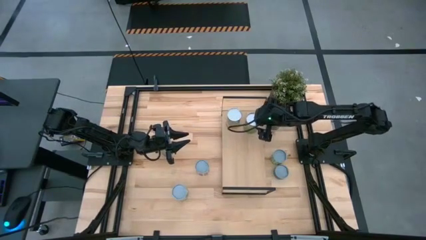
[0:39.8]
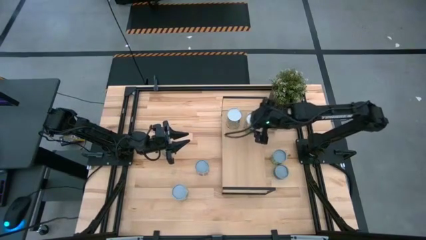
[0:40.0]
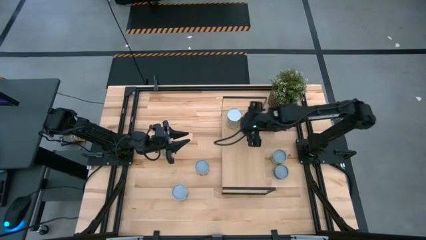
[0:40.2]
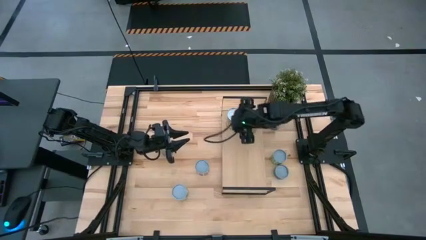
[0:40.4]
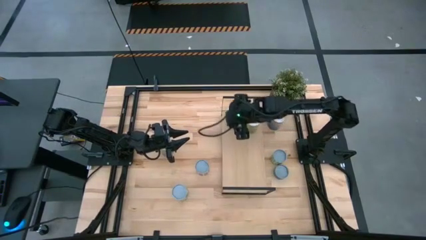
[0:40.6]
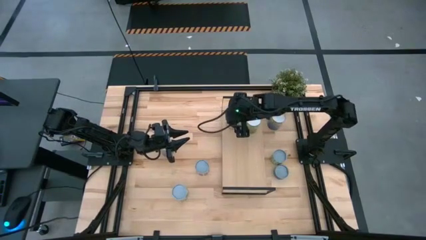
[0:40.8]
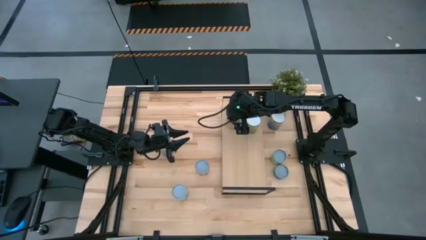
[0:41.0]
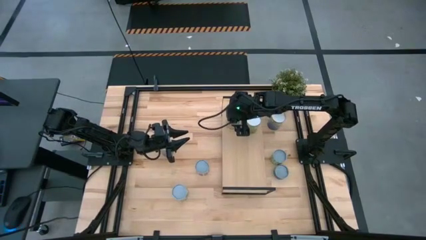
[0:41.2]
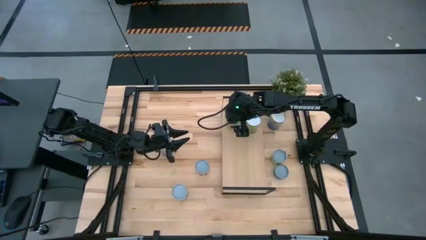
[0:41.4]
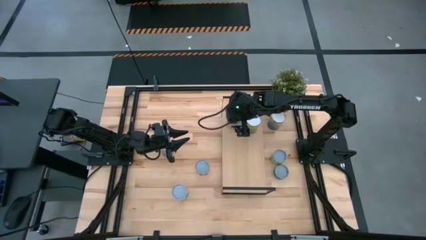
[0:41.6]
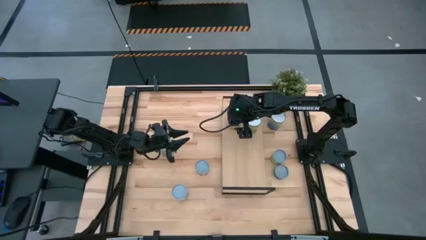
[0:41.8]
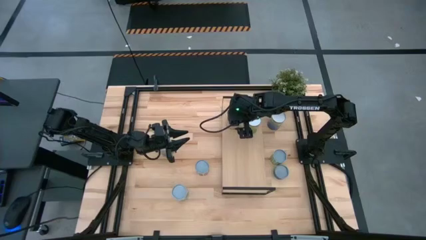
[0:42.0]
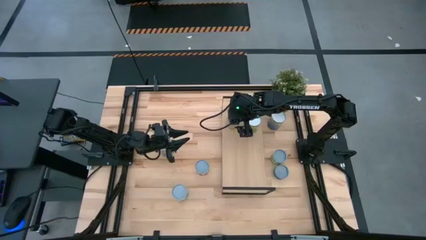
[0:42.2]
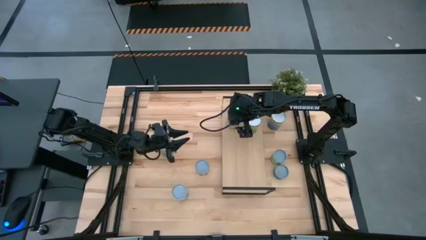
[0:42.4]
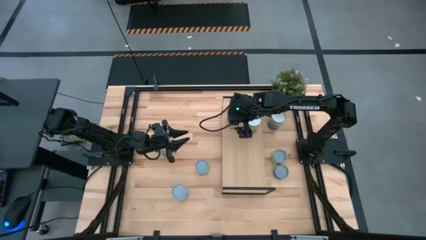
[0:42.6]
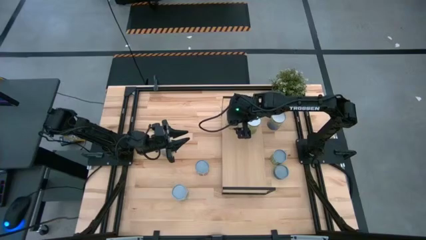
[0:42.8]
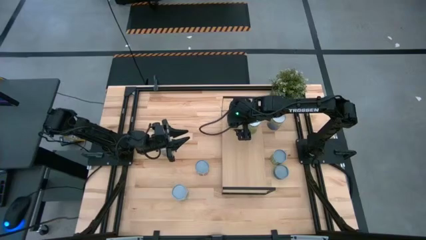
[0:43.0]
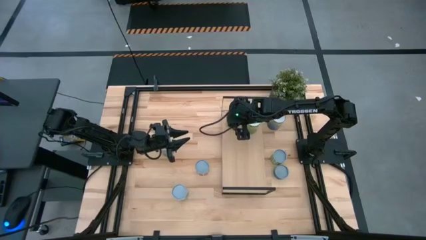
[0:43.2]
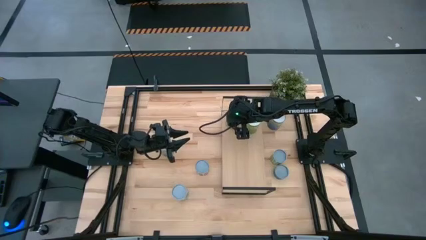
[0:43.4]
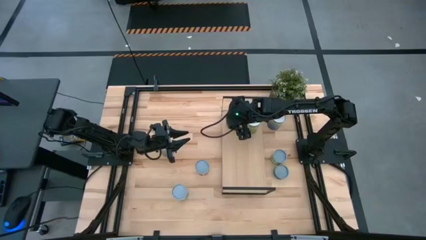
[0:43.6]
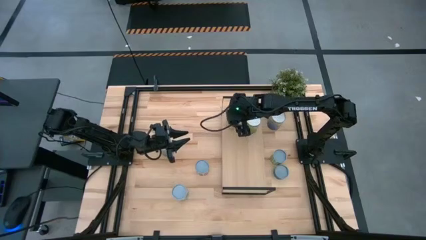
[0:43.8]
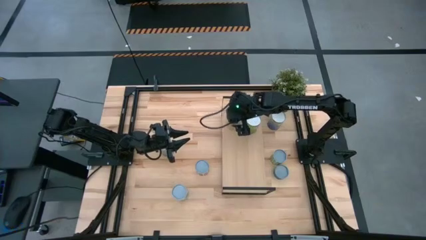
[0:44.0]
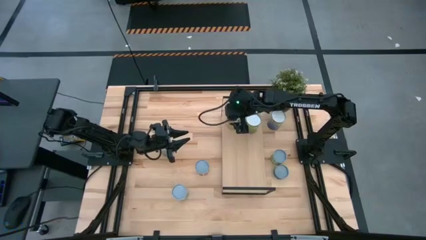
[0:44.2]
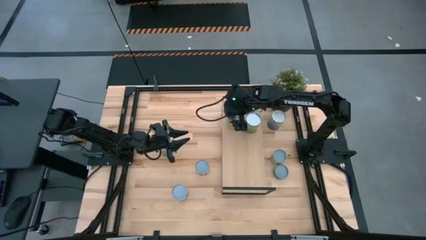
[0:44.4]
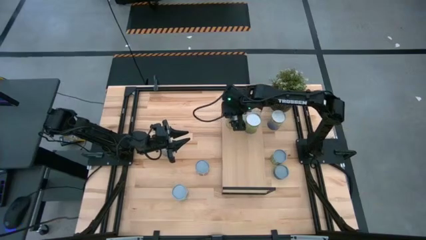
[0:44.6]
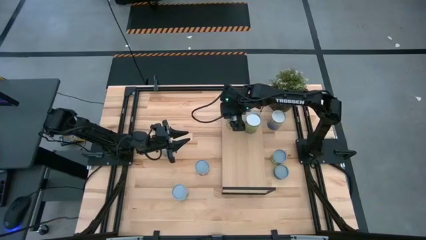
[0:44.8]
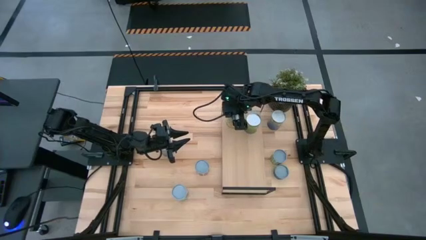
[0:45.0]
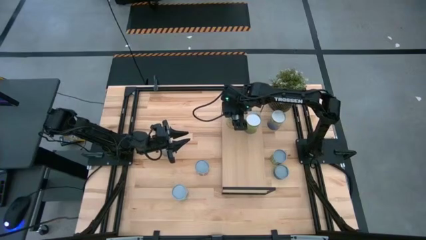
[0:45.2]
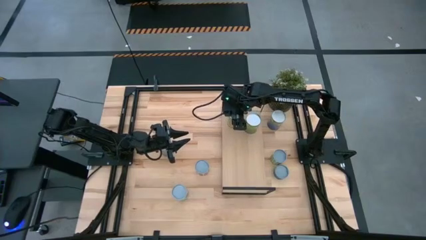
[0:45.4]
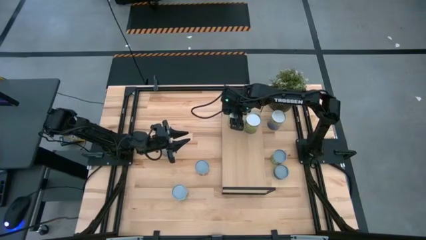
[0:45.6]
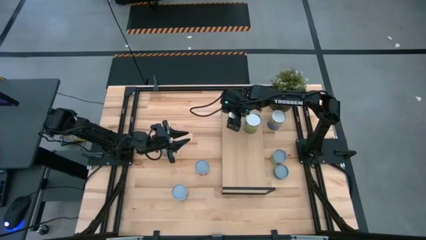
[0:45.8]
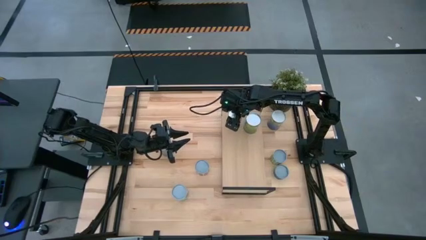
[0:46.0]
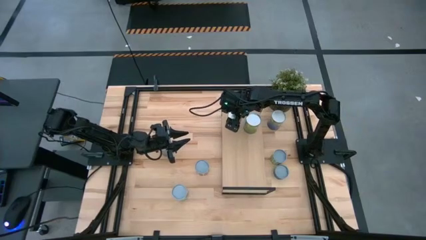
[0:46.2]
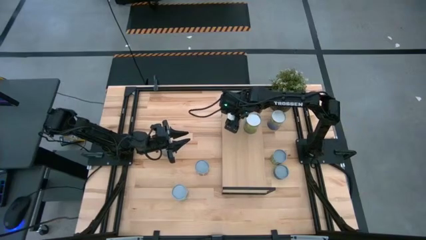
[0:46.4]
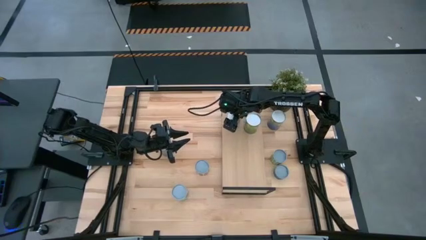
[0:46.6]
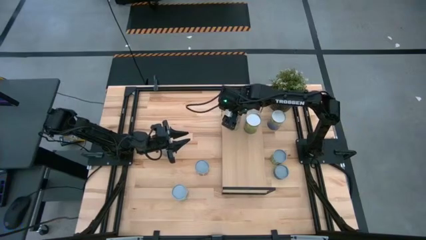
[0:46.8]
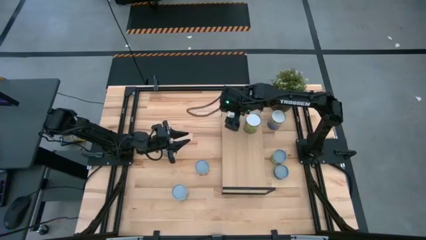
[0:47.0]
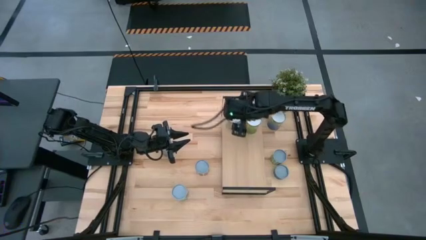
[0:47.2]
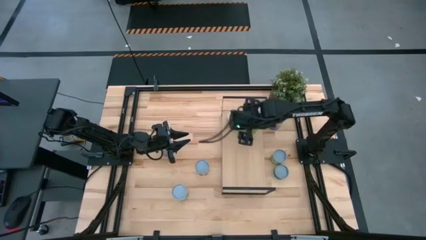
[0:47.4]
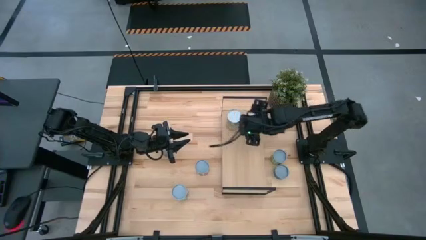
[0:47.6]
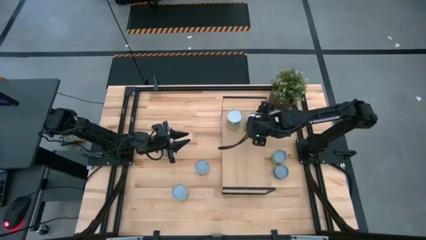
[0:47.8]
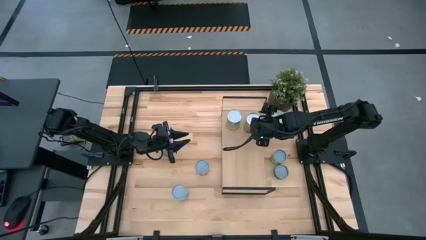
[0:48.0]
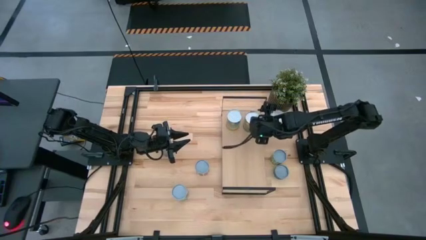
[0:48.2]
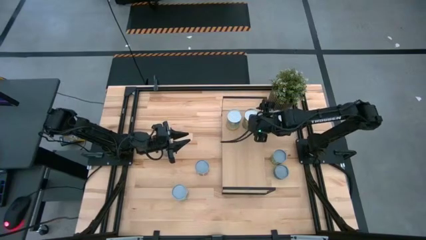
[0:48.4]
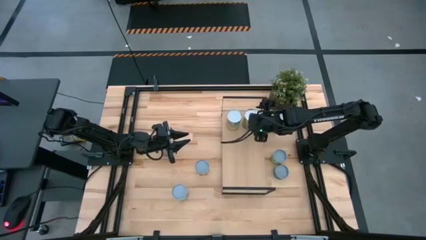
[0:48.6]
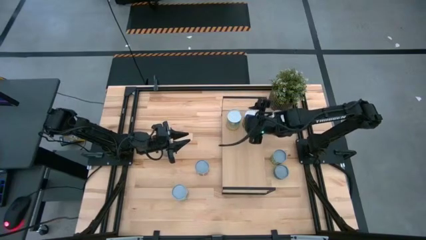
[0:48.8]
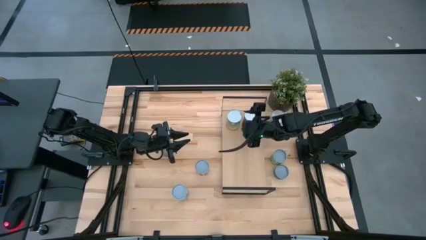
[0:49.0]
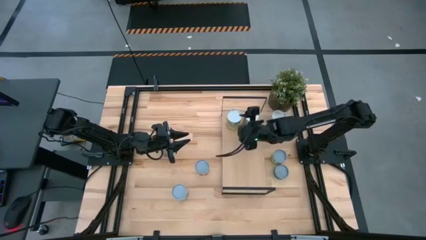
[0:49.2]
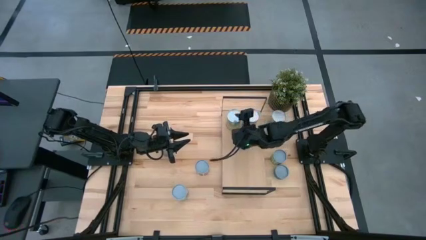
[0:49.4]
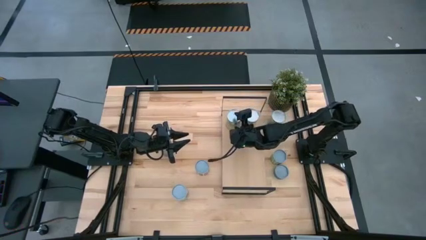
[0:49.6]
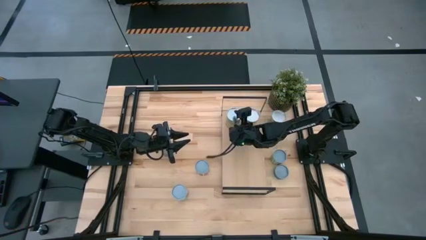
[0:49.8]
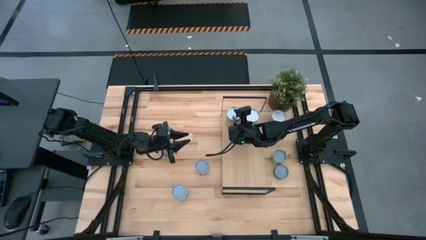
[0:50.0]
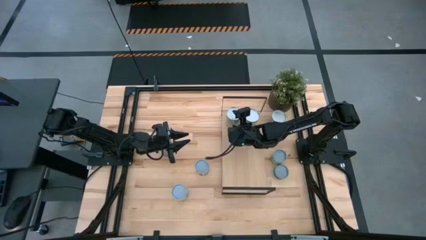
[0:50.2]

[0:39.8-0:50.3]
Task: Pick and place cans onto a shelf
Adjust the cans on the shelf

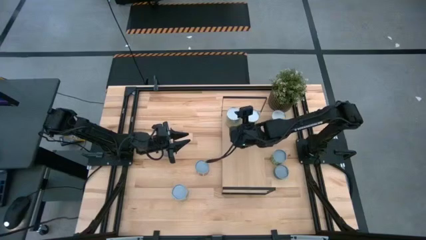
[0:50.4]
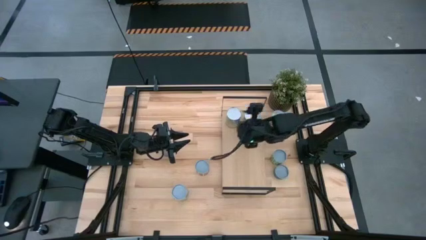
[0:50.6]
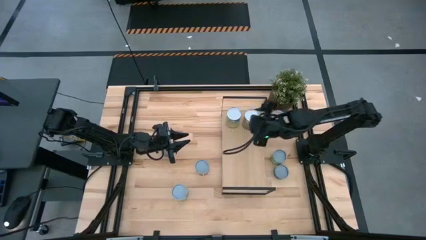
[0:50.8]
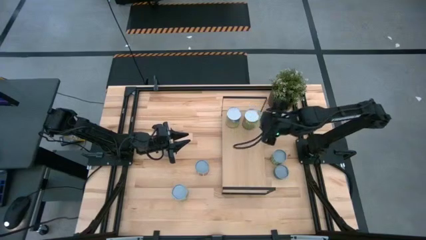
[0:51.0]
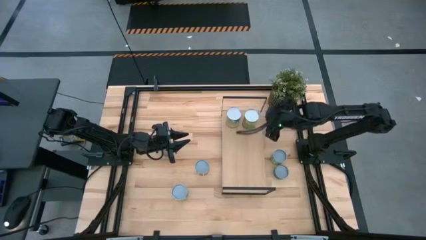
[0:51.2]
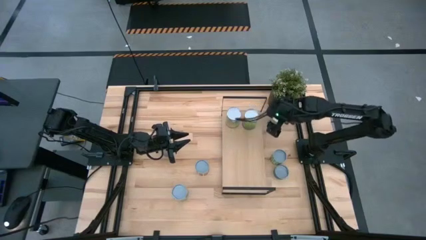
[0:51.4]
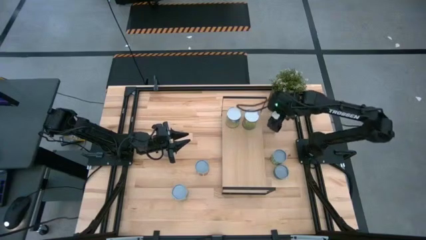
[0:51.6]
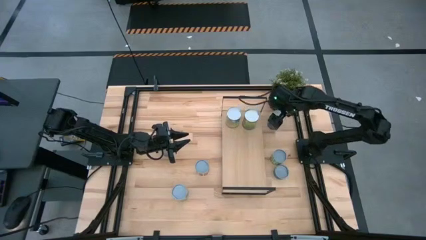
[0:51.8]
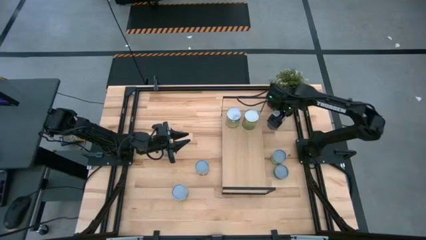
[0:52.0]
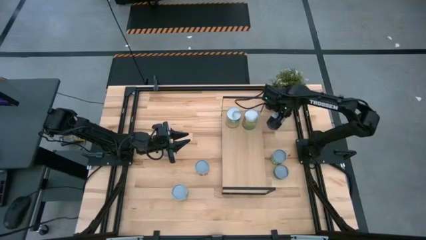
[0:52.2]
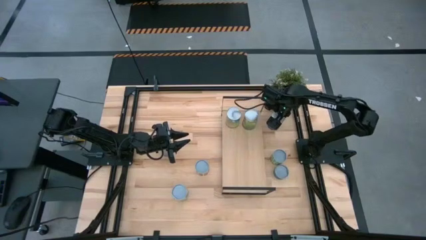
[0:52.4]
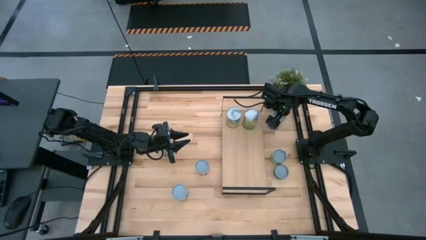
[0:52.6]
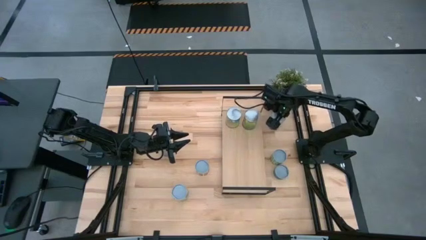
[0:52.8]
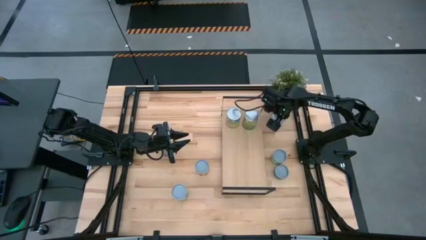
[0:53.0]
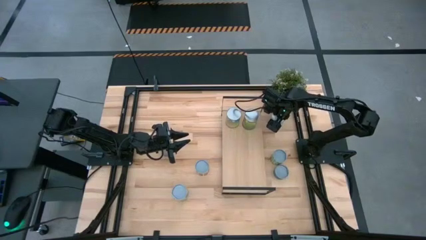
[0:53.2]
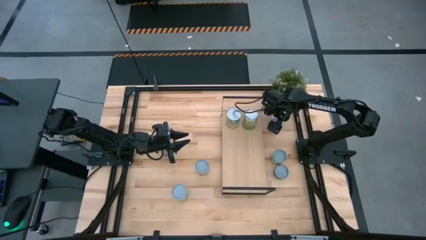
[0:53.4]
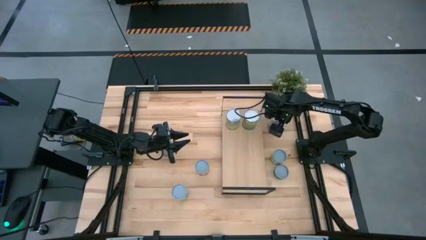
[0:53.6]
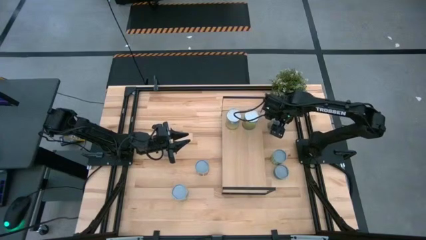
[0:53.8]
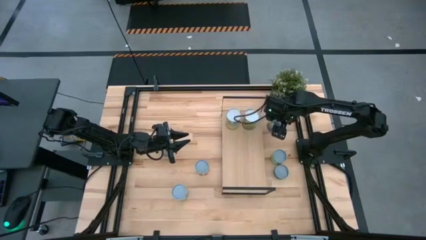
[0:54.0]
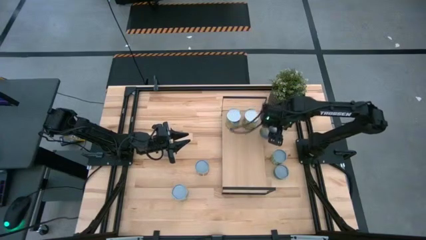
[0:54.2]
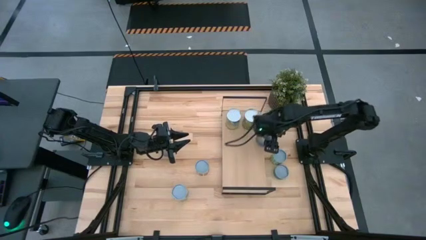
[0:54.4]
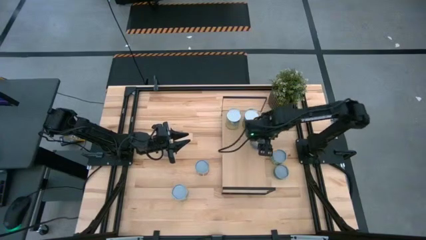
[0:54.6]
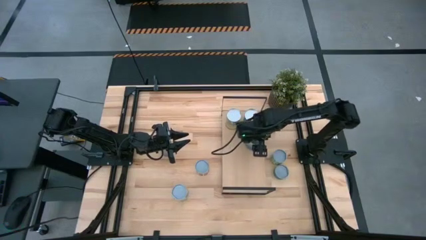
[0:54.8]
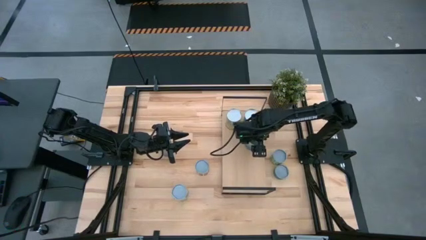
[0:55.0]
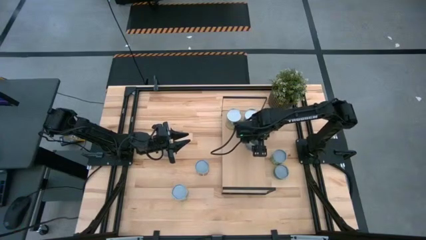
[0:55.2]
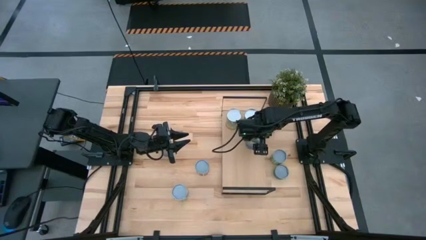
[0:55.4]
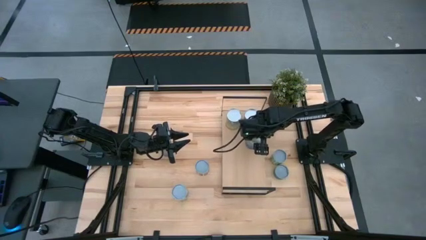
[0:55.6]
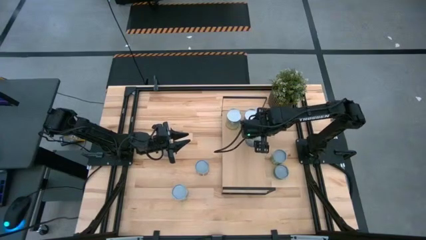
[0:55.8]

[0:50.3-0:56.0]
Put the large canned peas on the shelf
